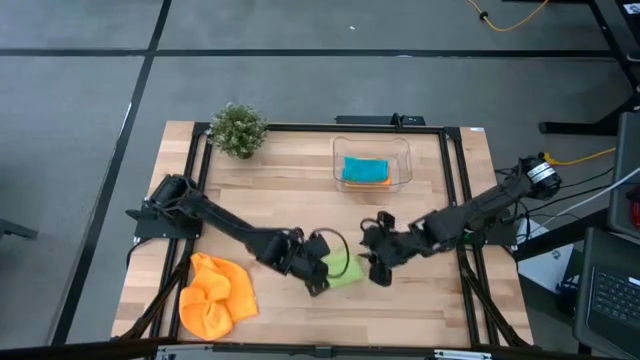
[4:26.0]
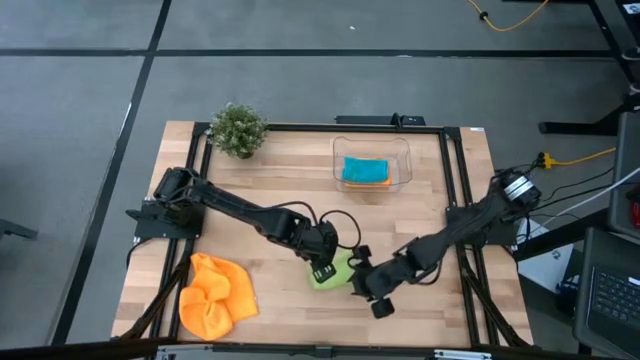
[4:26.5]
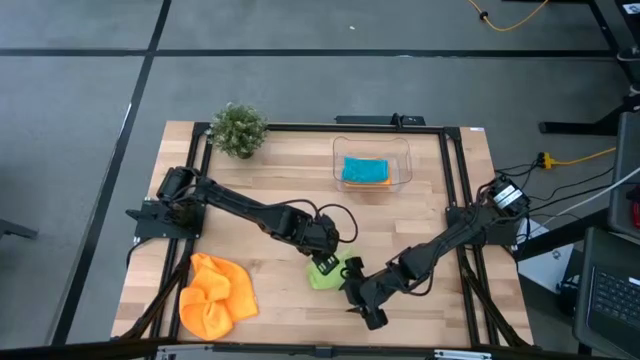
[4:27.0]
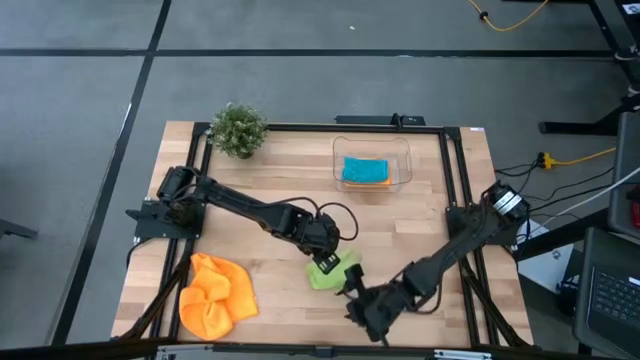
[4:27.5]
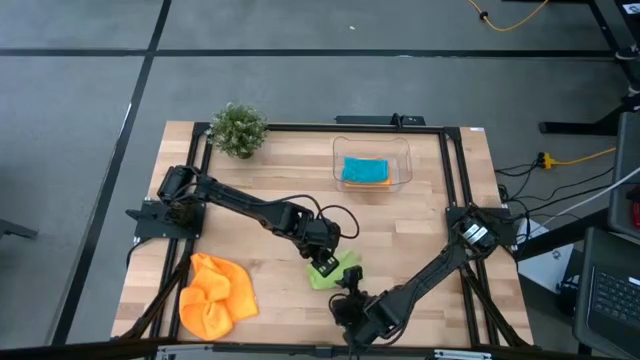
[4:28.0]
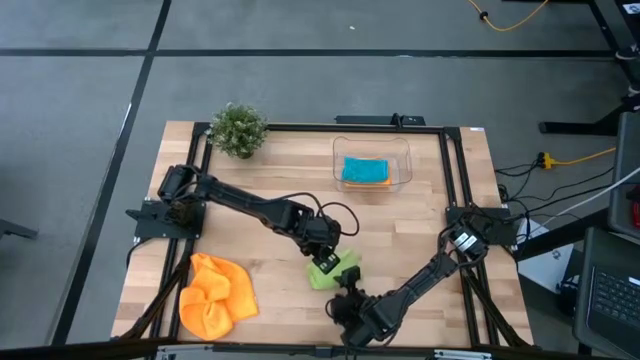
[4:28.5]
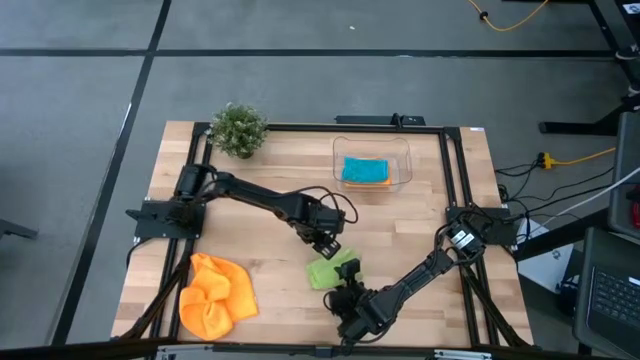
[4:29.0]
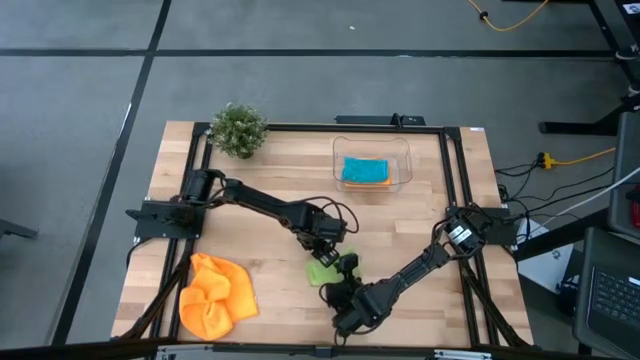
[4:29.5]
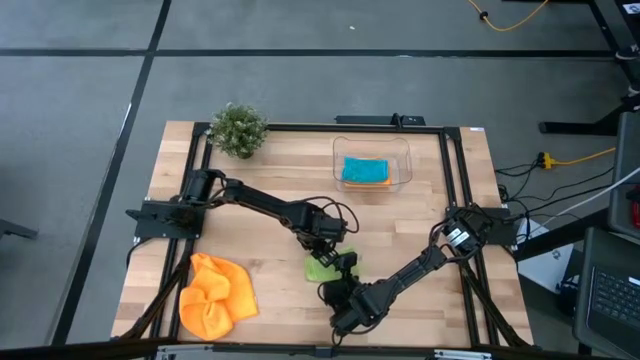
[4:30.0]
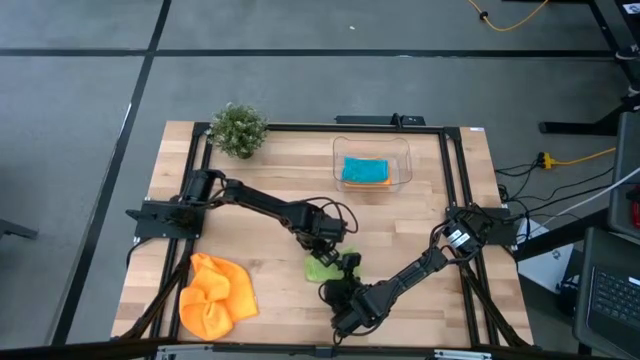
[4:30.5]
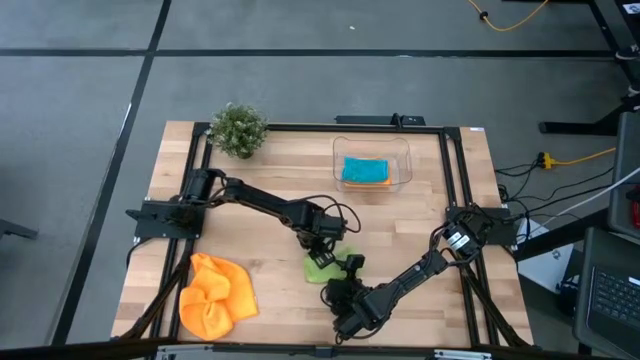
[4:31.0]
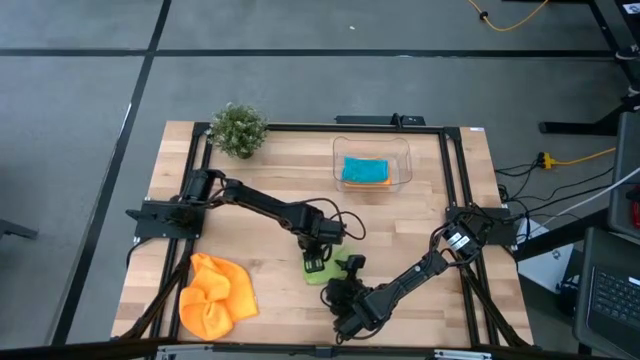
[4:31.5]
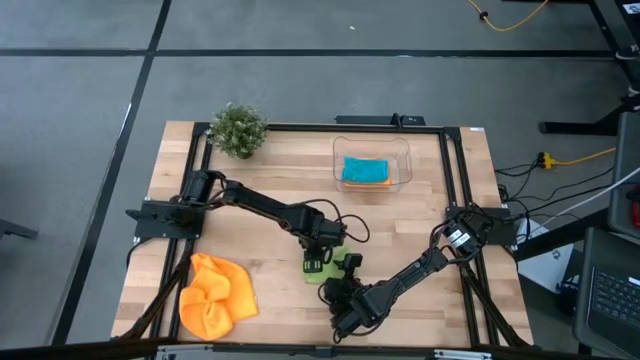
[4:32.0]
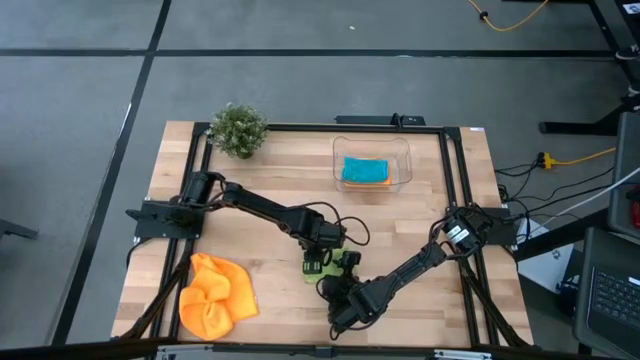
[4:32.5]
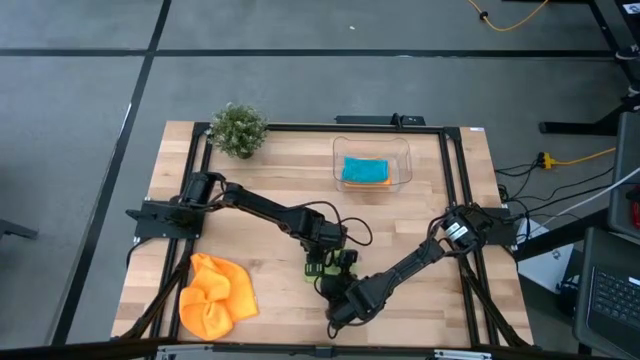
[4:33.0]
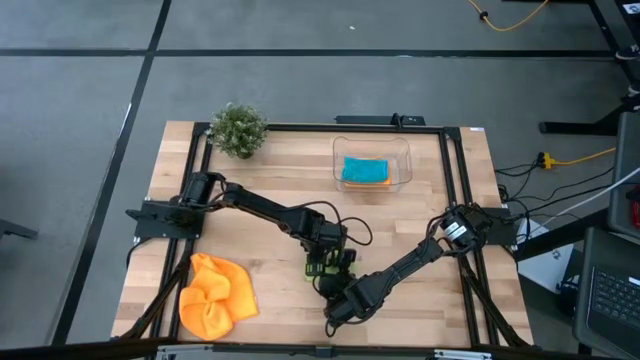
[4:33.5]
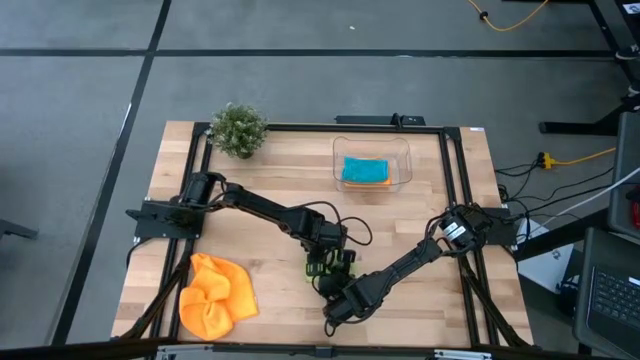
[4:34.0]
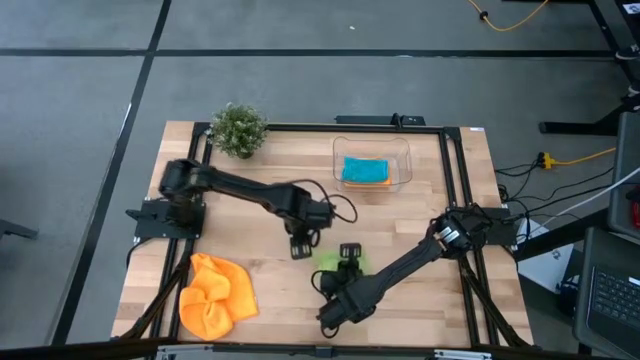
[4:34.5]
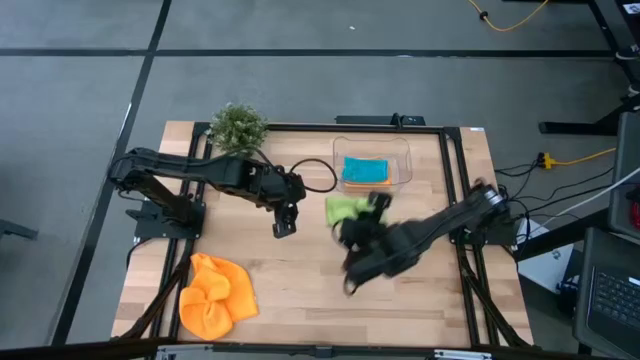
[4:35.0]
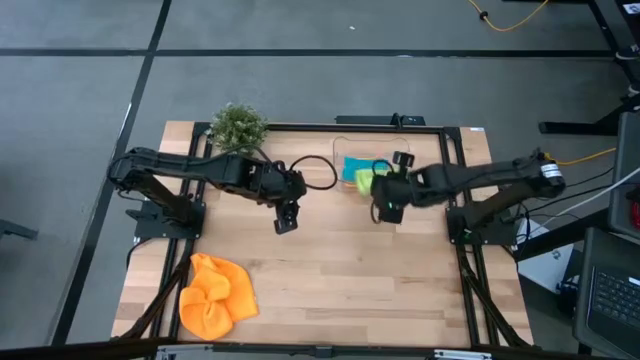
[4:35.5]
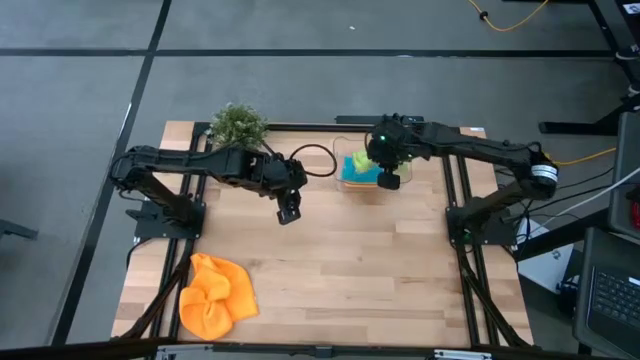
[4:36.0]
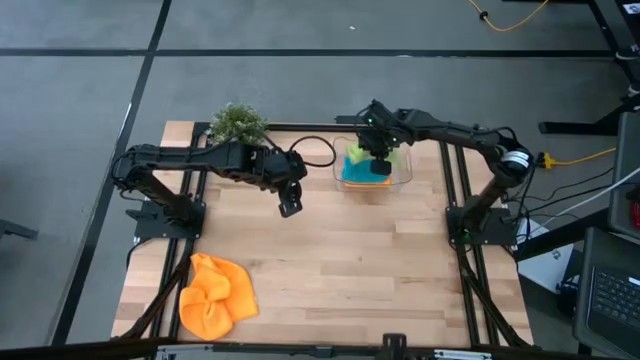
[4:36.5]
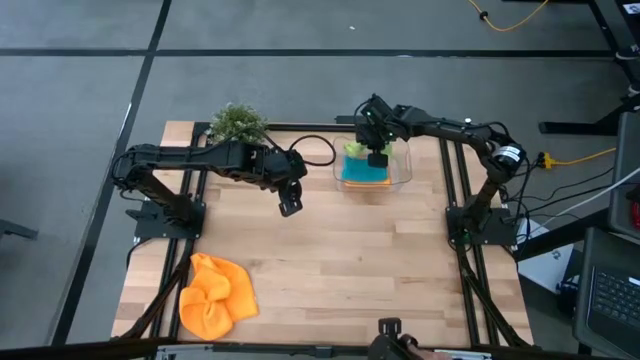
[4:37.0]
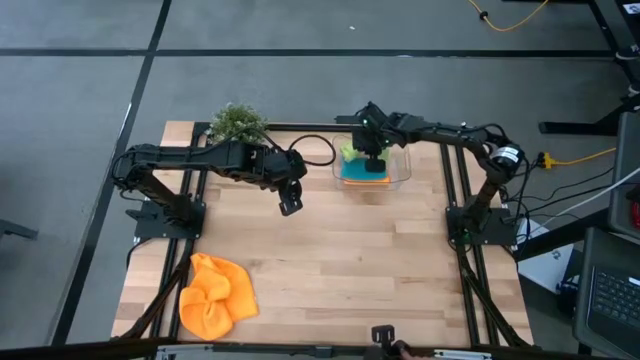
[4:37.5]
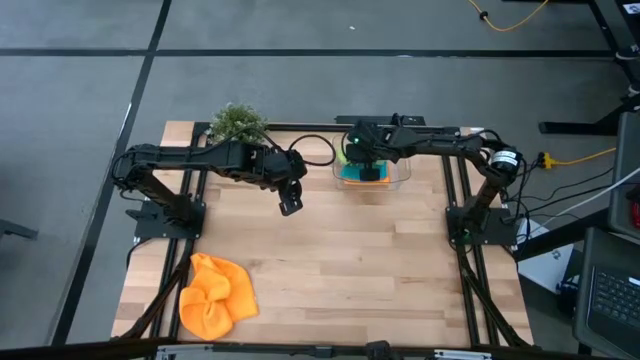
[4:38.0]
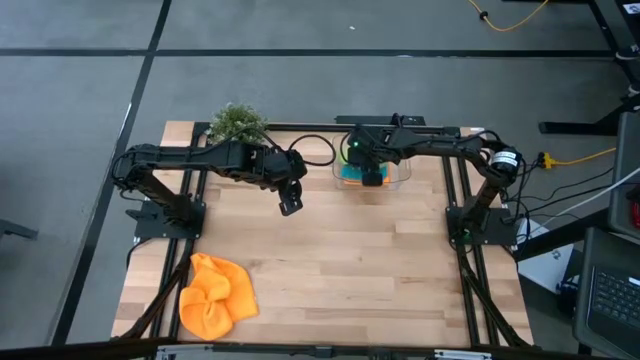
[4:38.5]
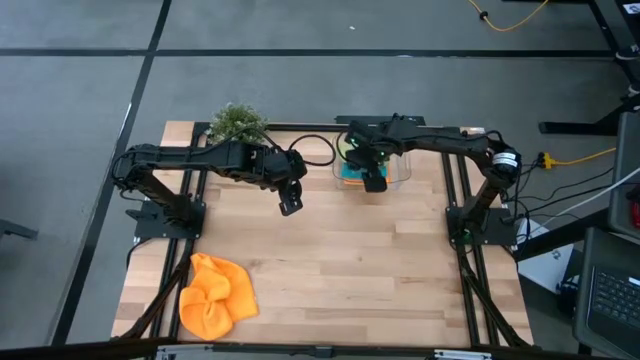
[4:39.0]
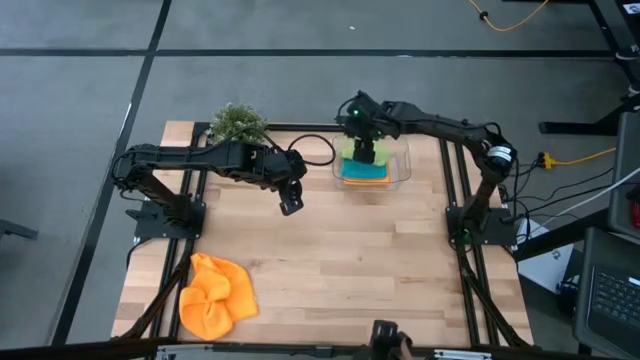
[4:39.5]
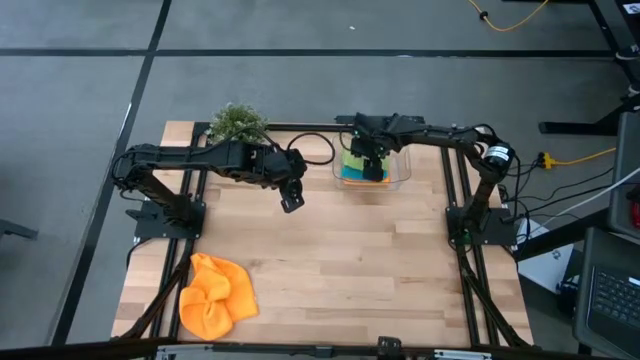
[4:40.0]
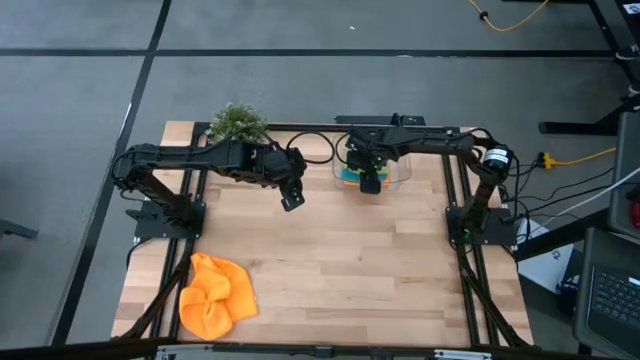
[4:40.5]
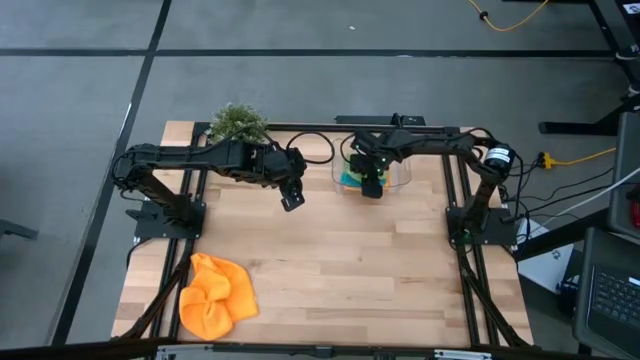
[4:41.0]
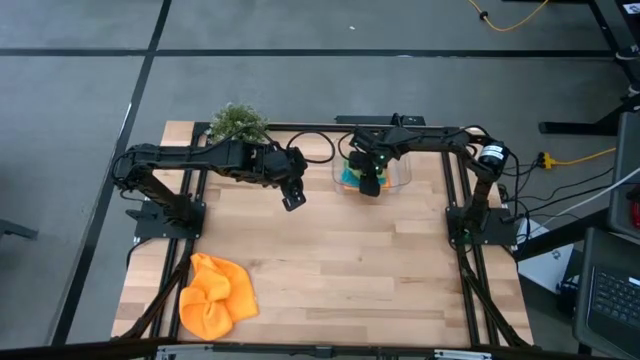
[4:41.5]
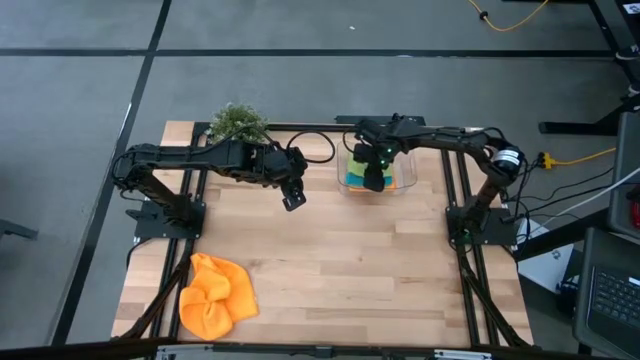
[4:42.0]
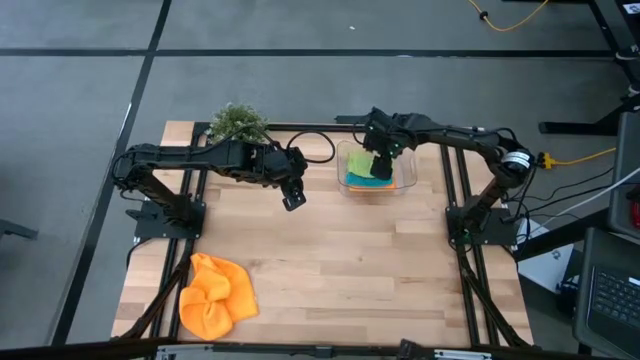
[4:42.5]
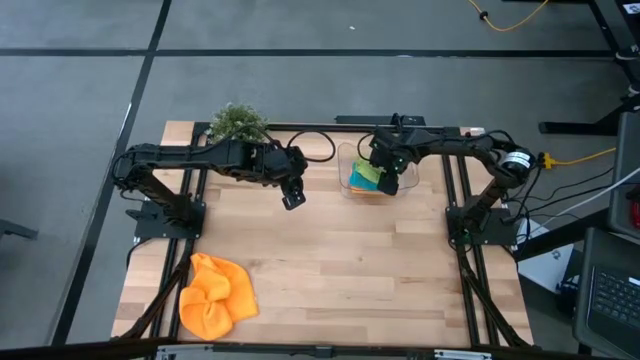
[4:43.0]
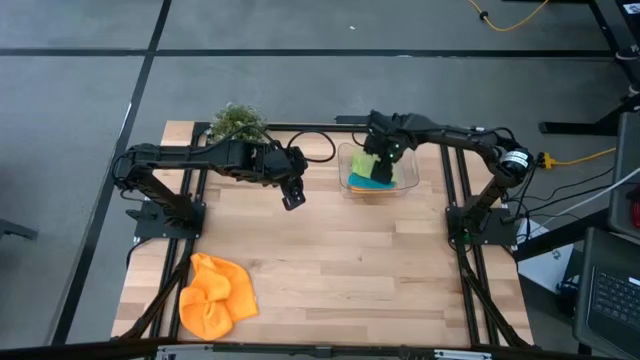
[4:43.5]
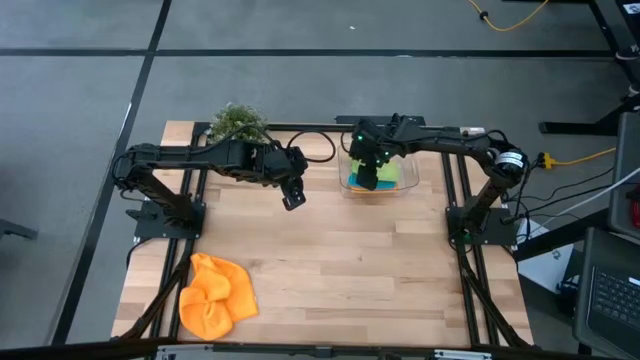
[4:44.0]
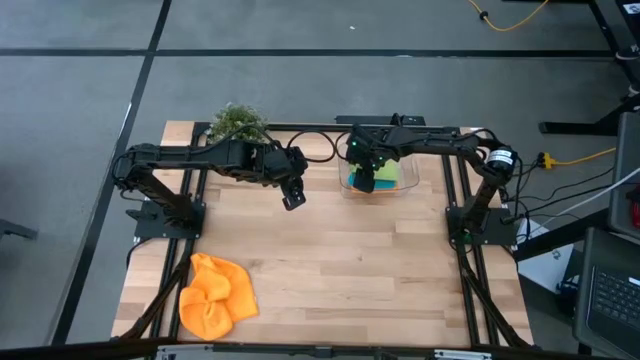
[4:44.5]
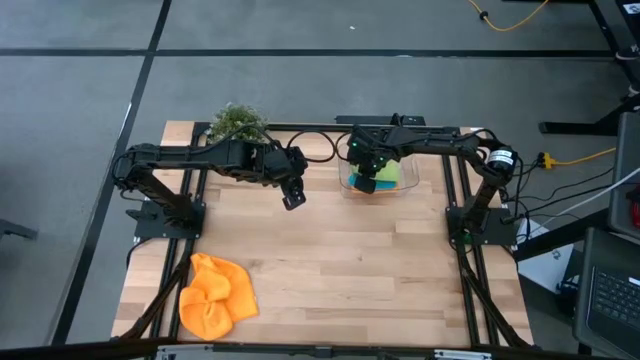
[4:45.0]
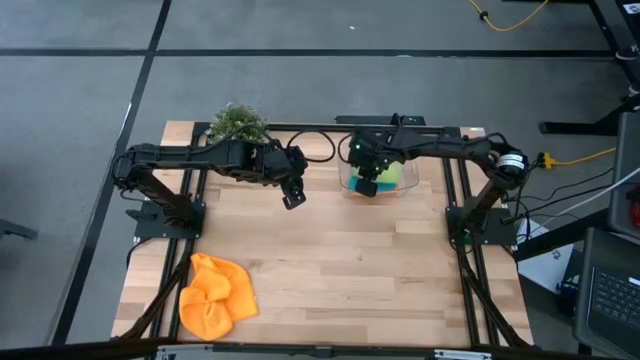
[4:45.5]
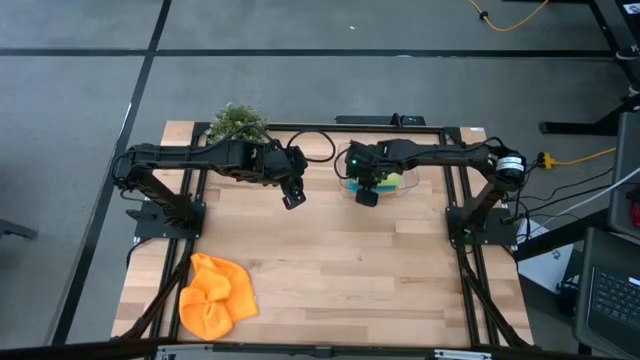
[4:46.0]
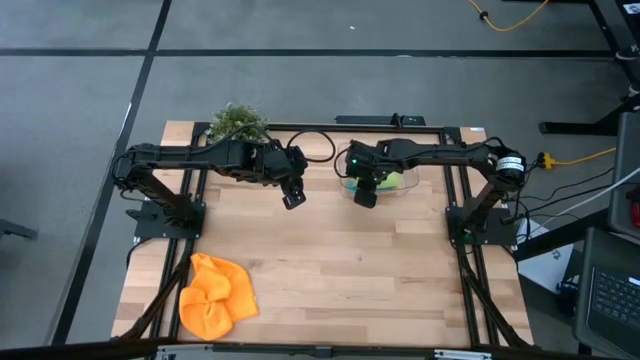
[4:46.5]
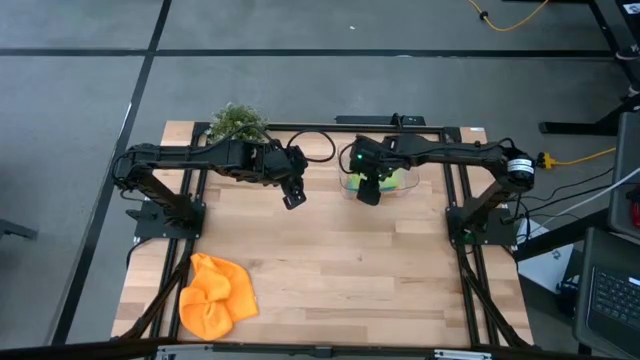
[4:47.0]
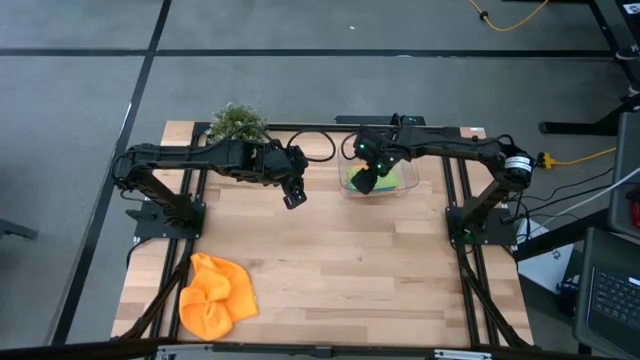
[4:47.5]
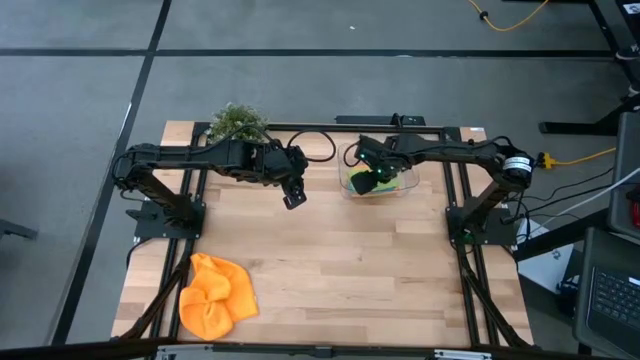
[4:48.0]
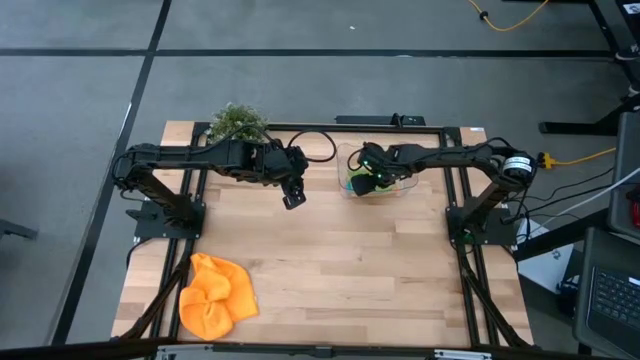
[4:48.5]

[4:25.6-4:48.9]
Task: Fold microfiber towels
Stack the green microfiber cloth on top of the blue microfiber cloth in the bin
